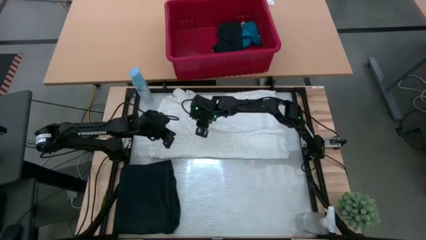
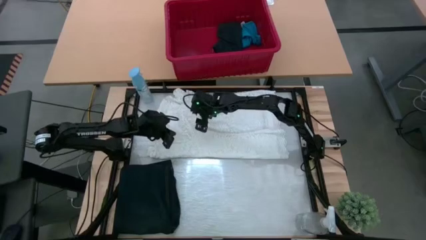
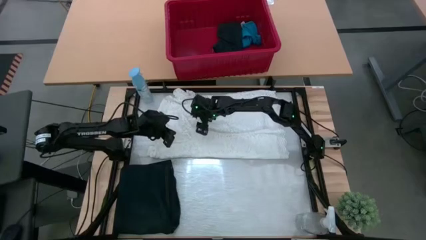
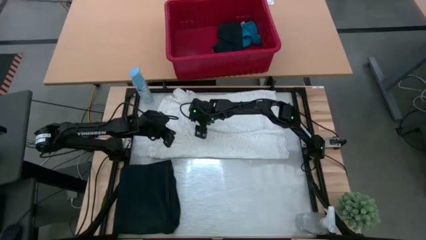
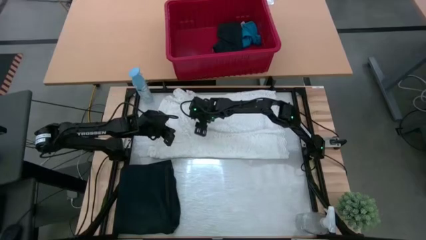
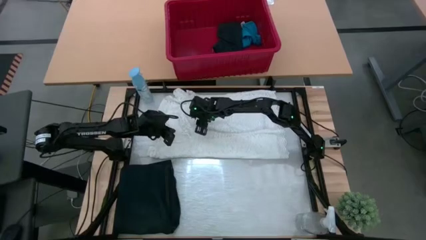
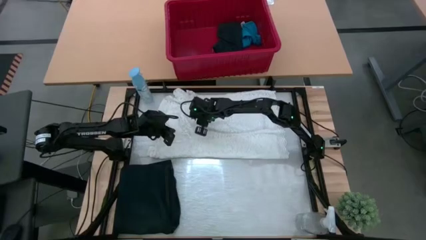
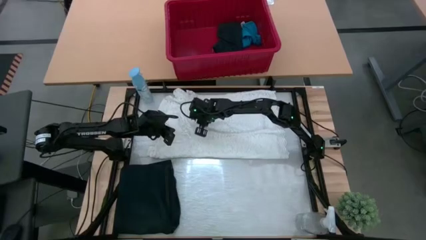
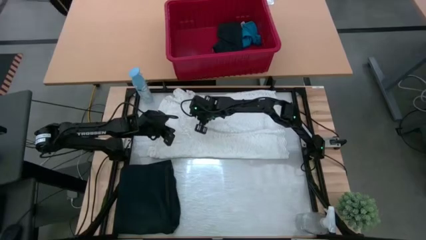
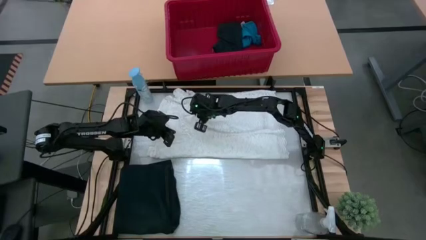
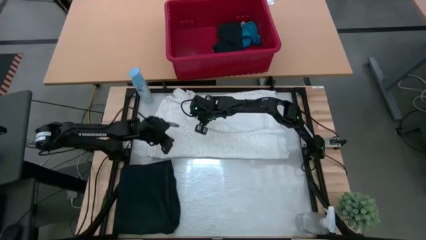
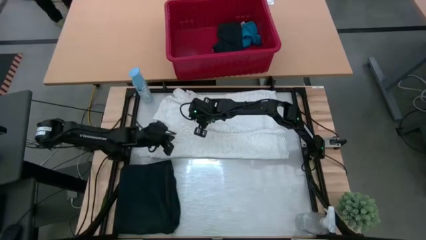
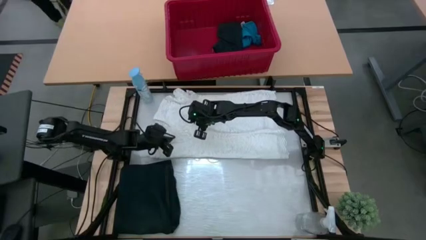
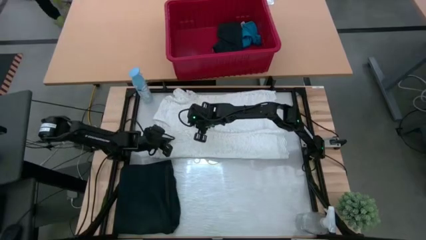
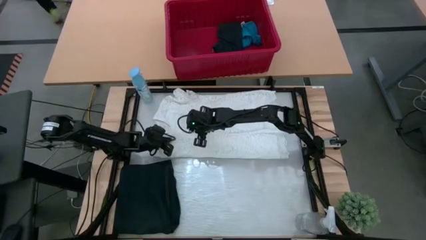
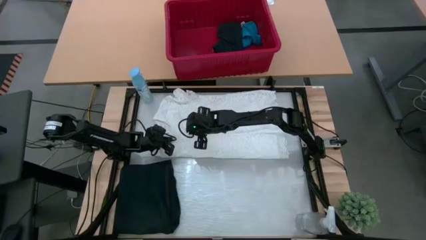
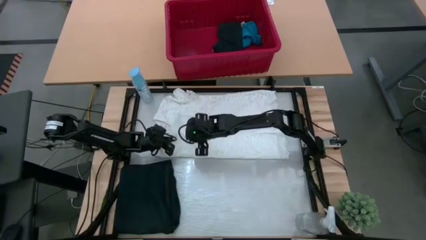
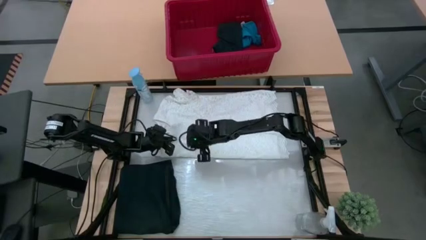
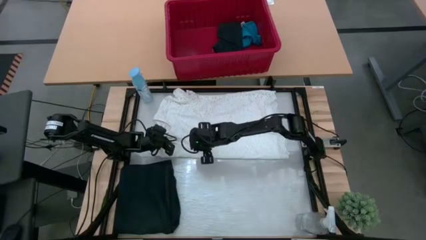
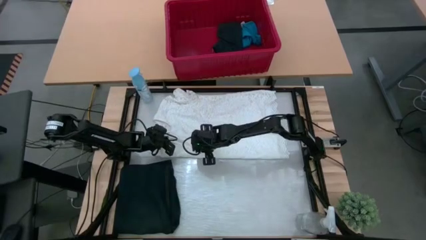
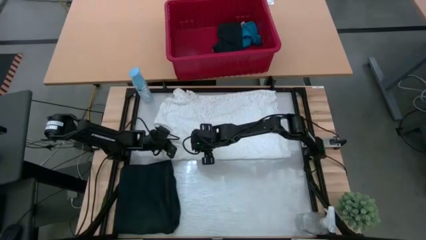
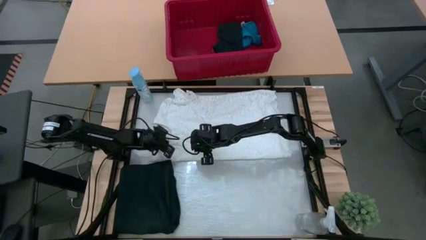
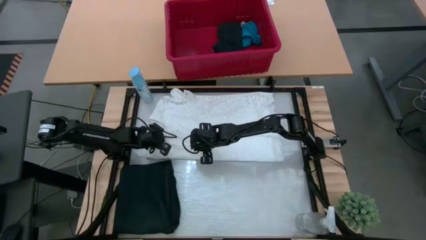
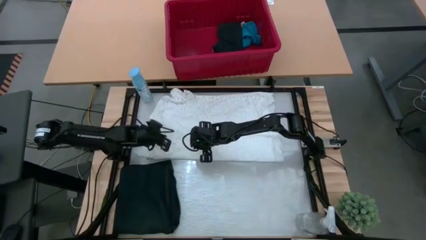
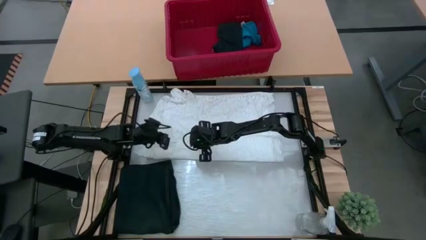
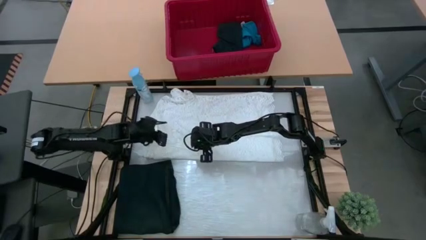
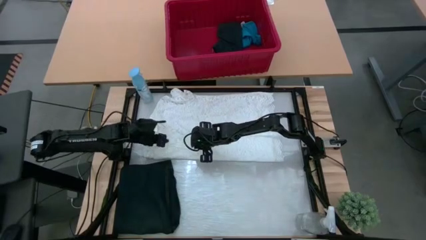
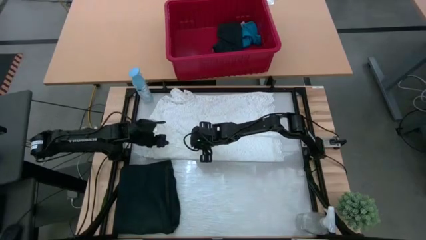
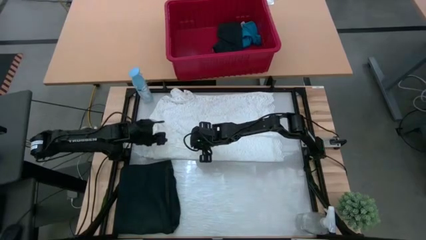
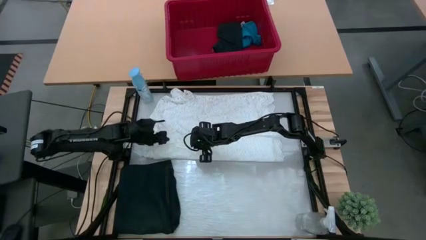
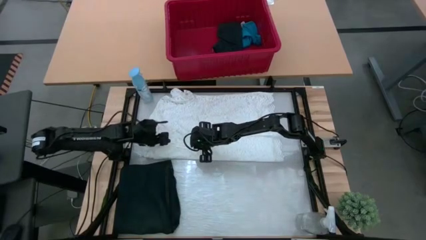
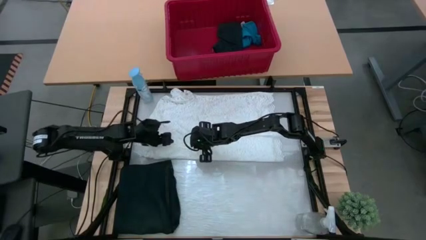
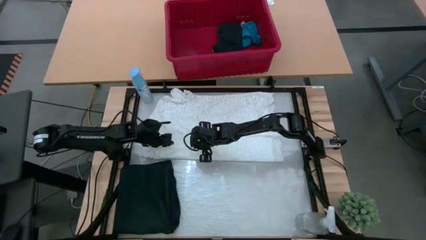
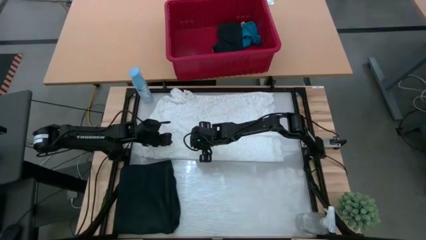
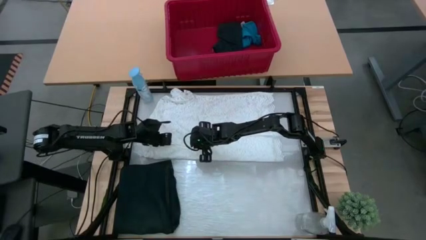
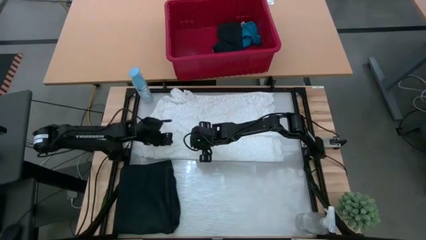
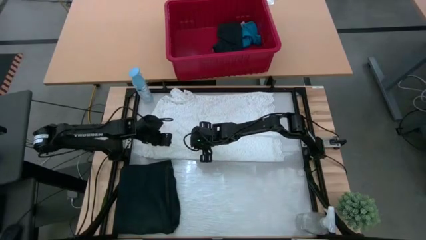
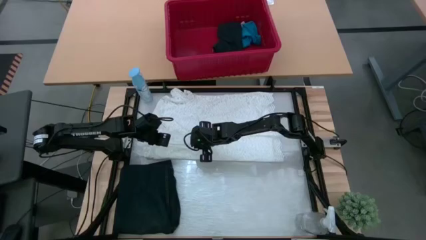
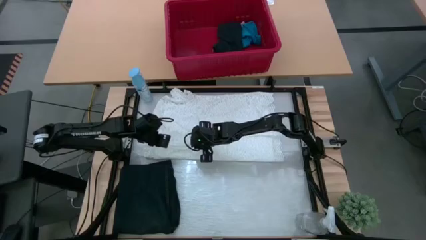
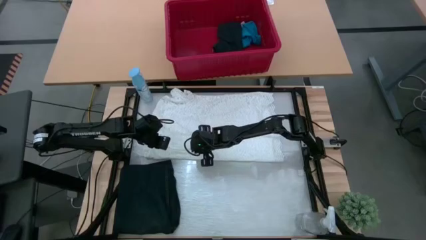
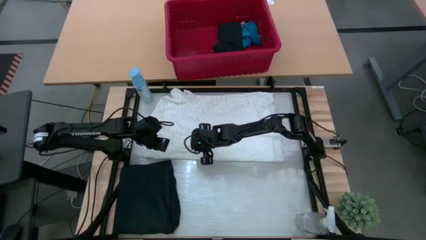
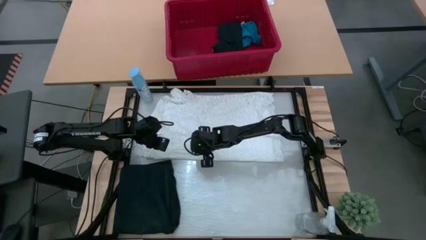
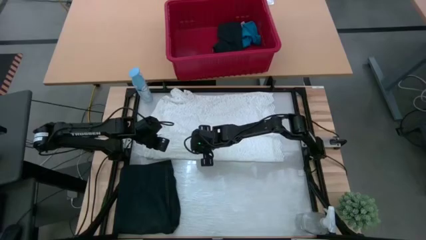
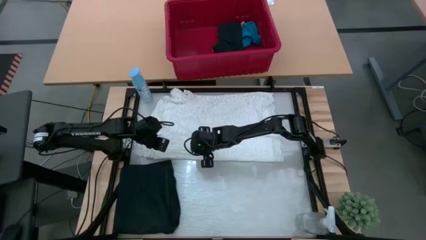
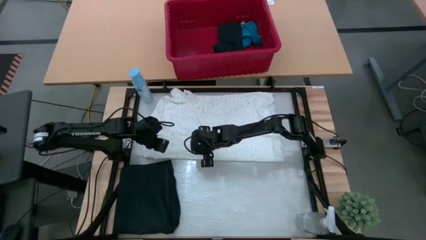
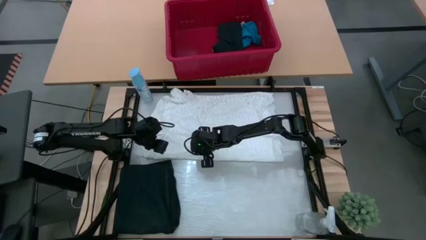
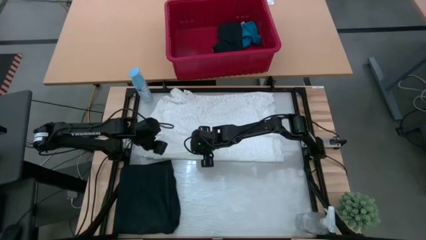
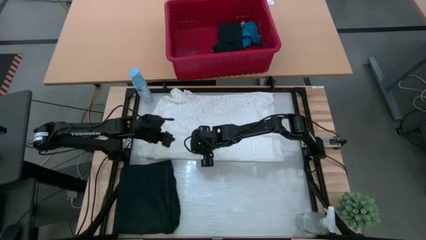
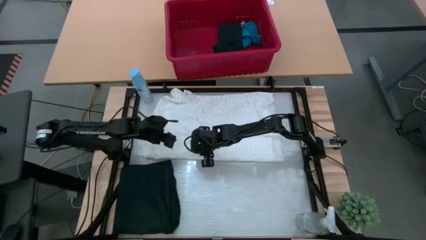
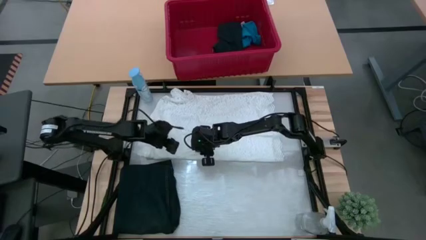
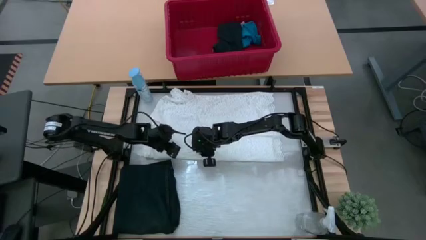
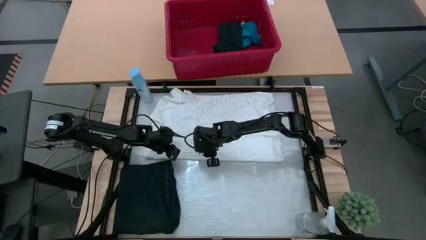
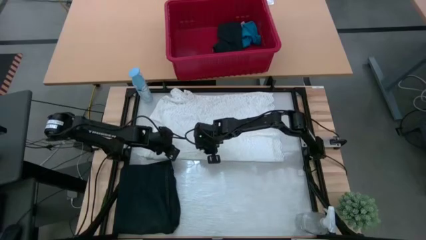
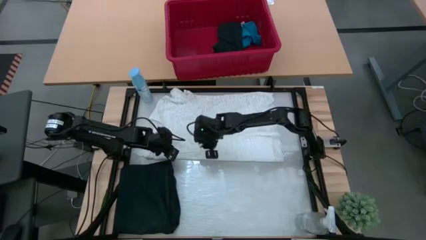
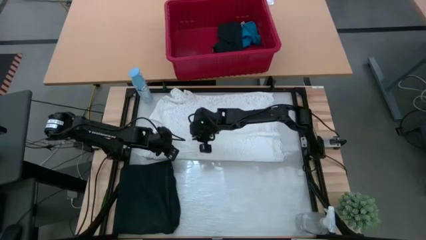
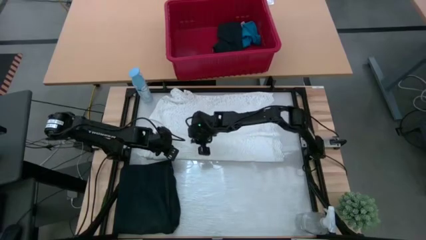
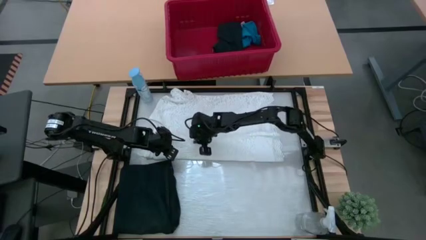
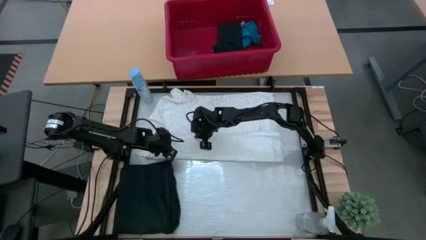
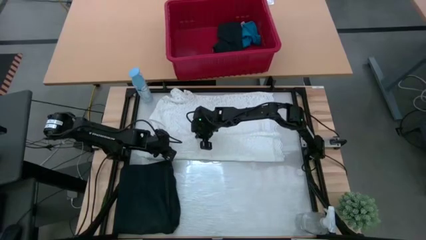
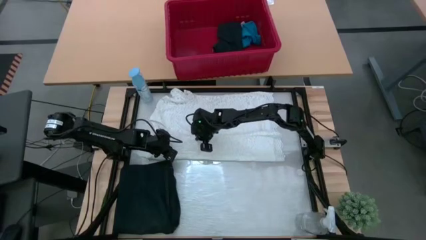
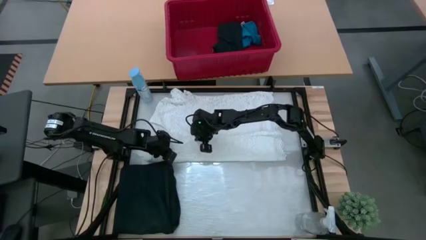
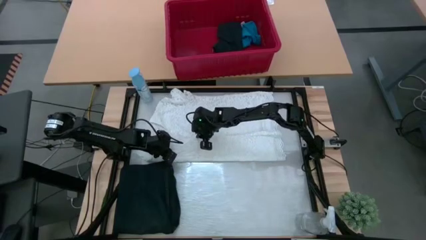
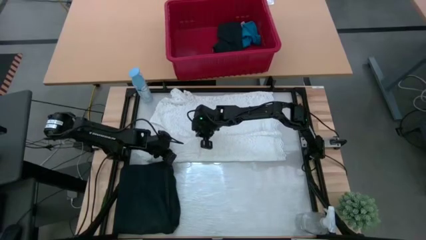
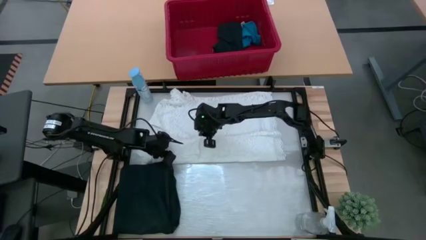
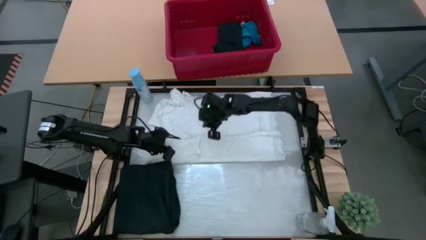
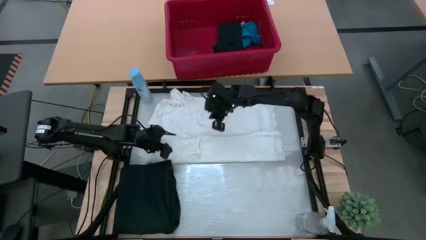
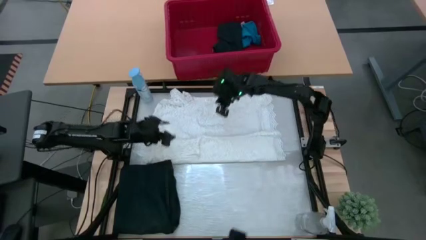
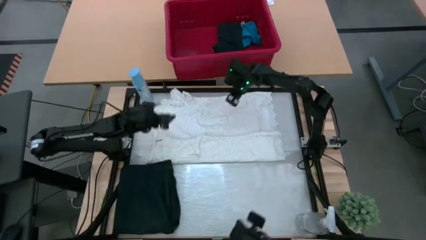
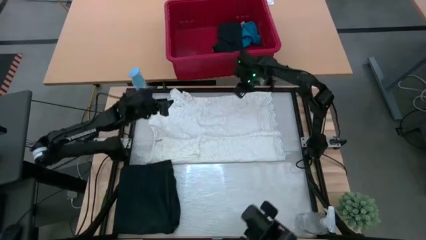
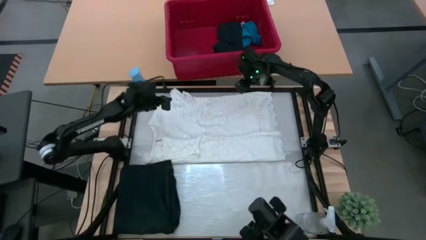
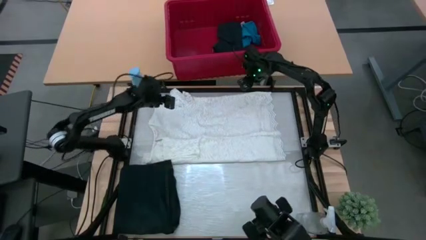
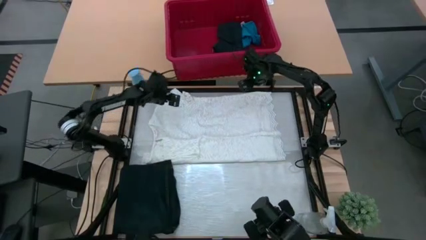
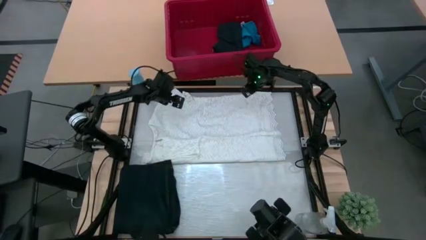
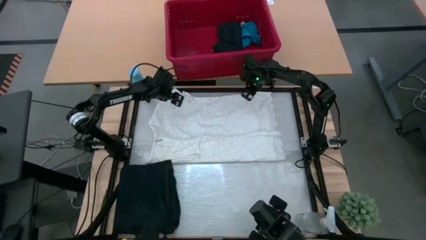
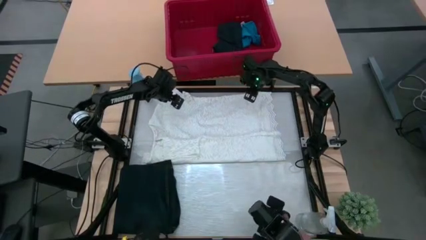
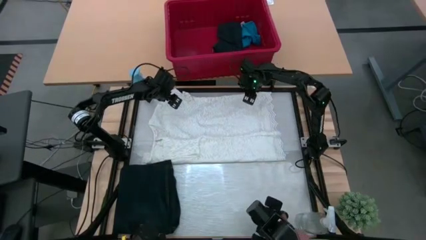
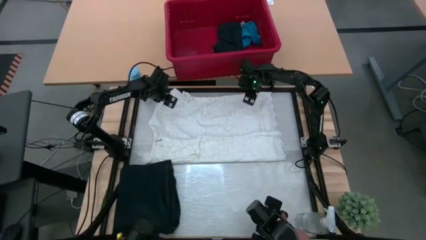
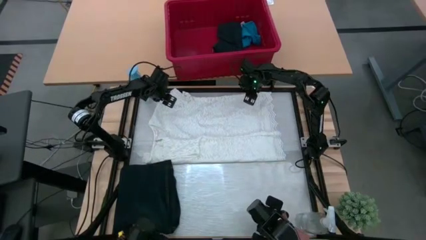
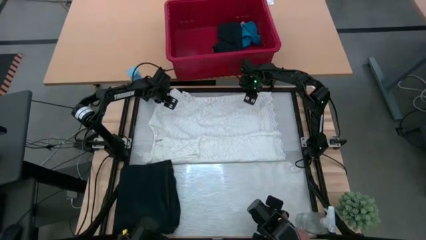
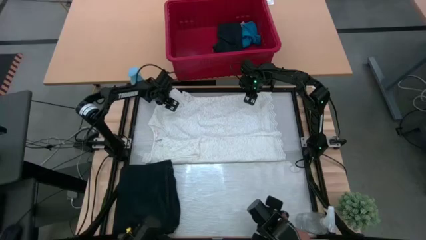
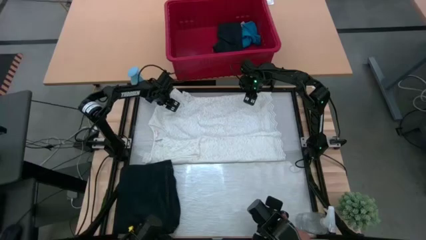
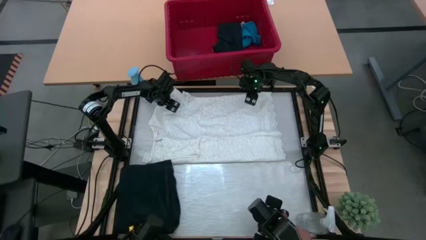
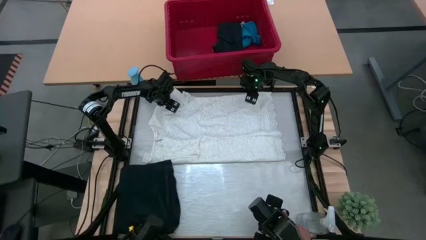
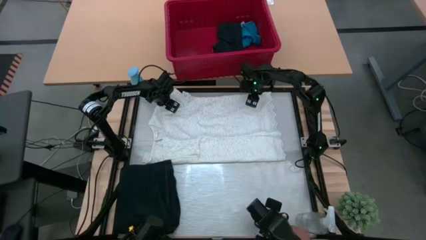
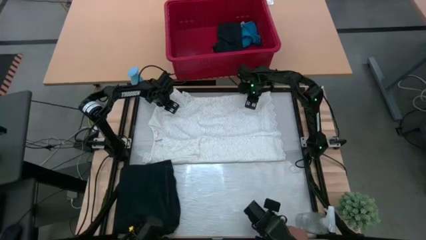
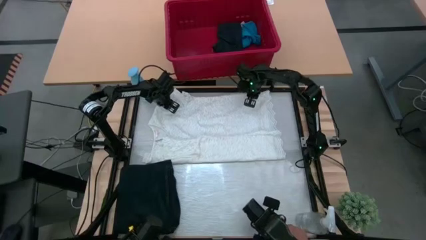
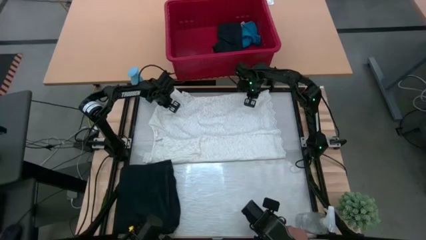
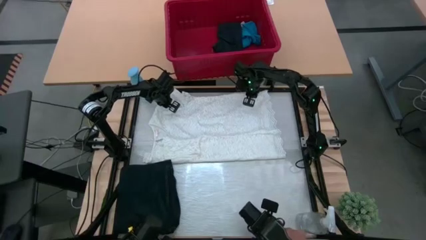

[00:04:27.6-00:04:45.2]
Task: Fold Laundry from Bin
Fold the white dress from the red bin
